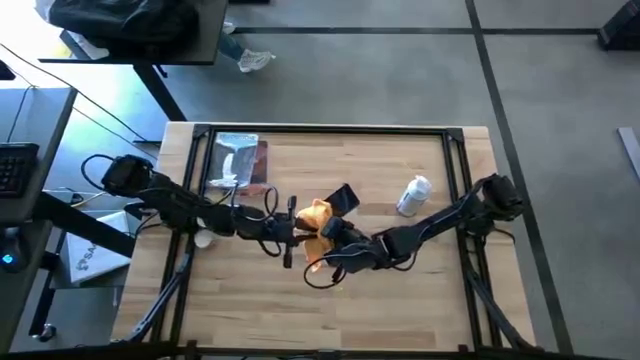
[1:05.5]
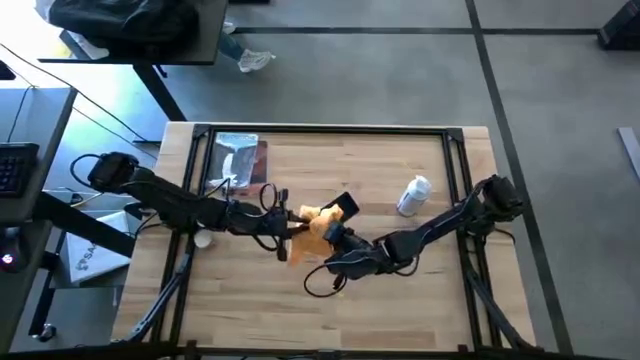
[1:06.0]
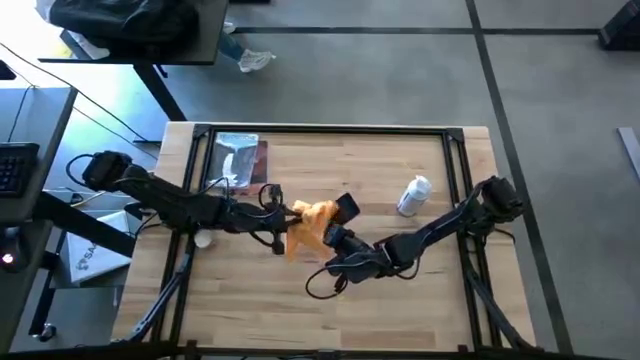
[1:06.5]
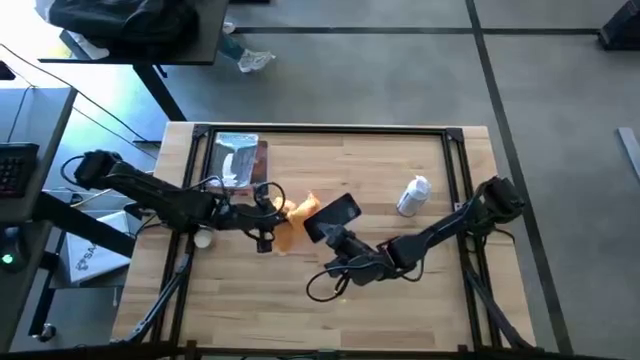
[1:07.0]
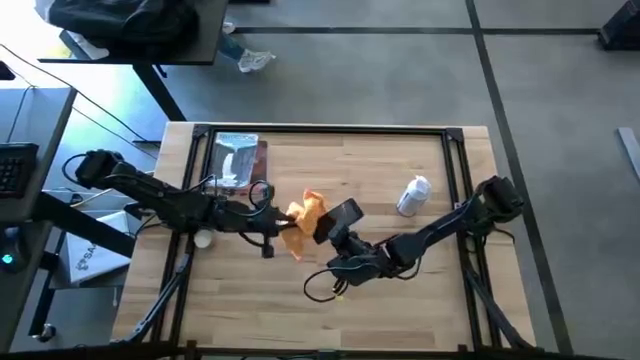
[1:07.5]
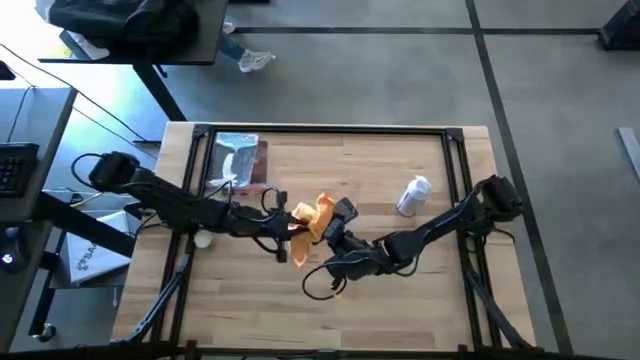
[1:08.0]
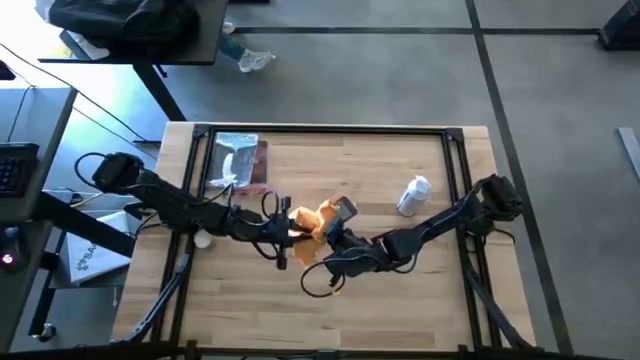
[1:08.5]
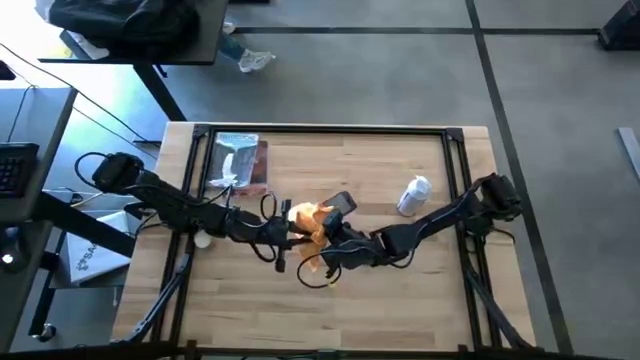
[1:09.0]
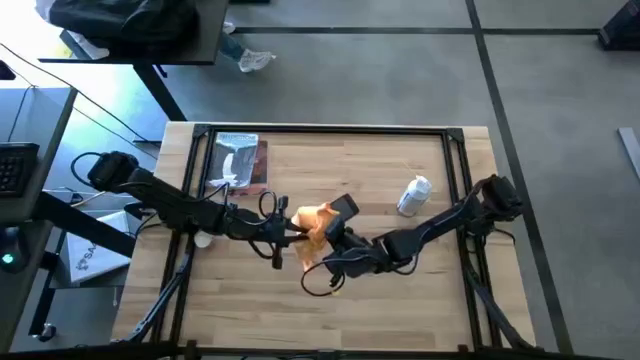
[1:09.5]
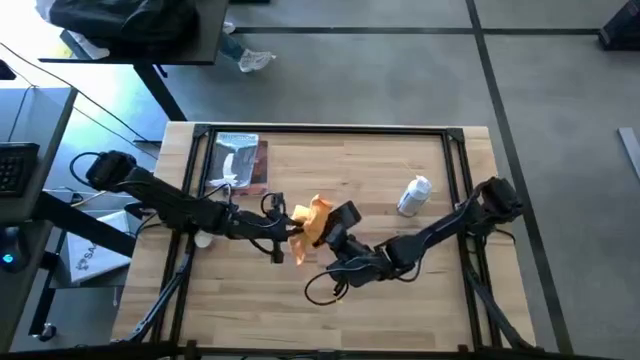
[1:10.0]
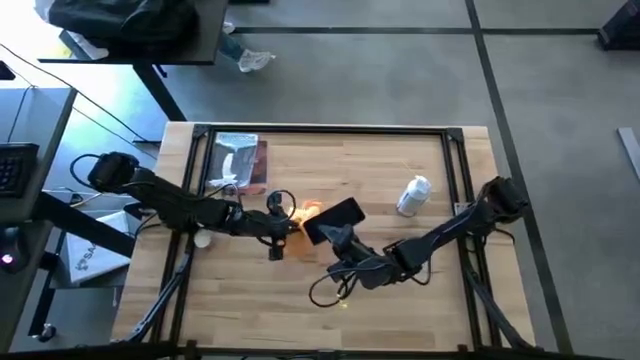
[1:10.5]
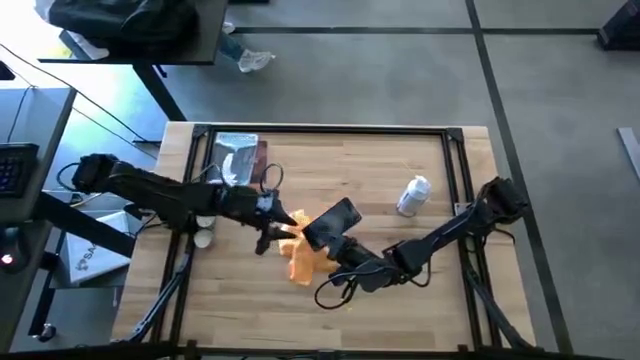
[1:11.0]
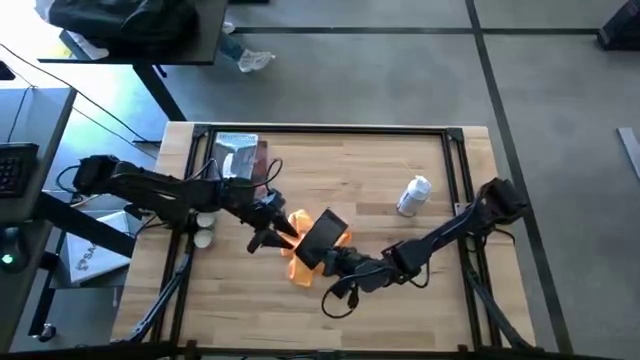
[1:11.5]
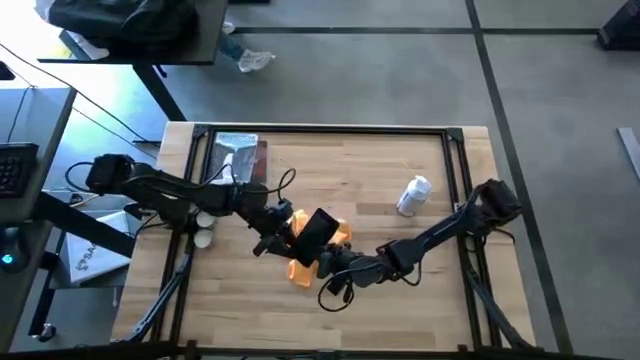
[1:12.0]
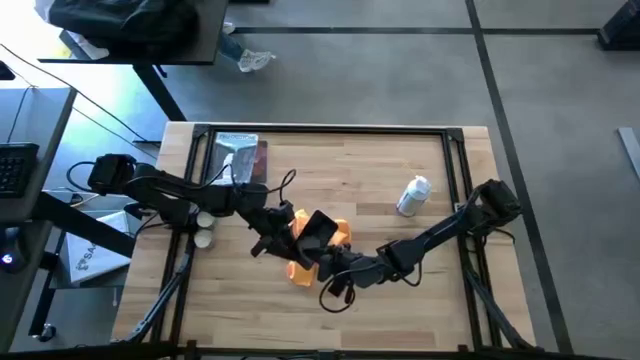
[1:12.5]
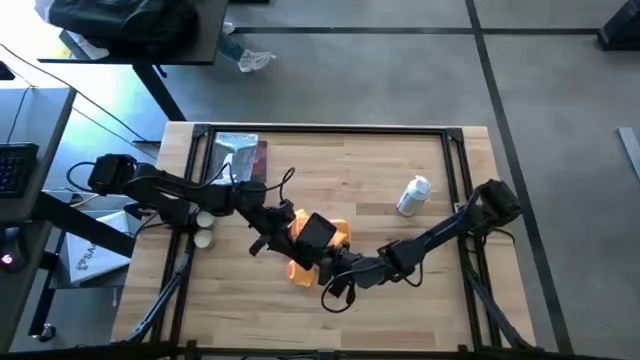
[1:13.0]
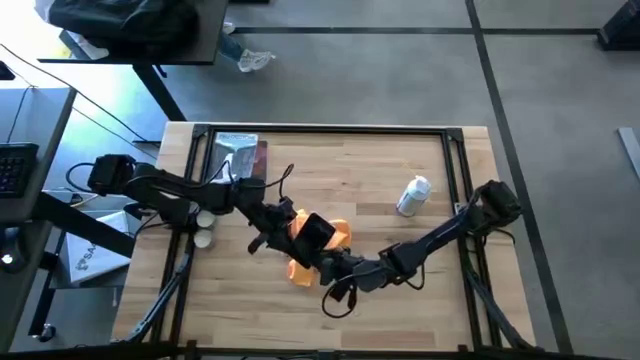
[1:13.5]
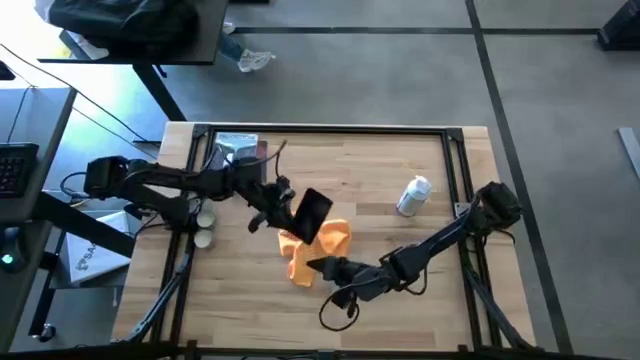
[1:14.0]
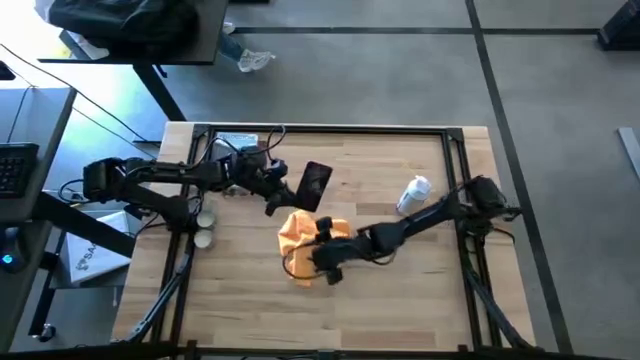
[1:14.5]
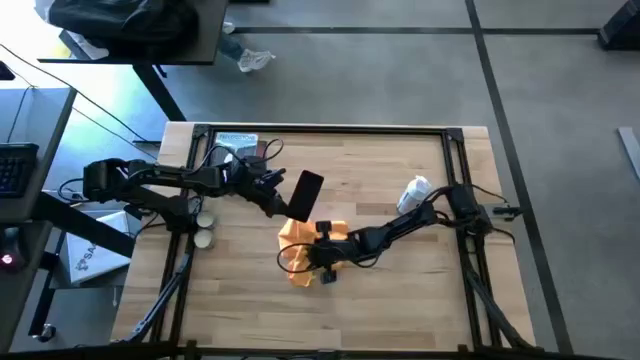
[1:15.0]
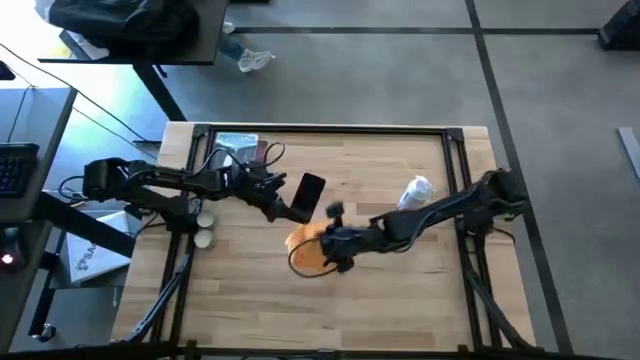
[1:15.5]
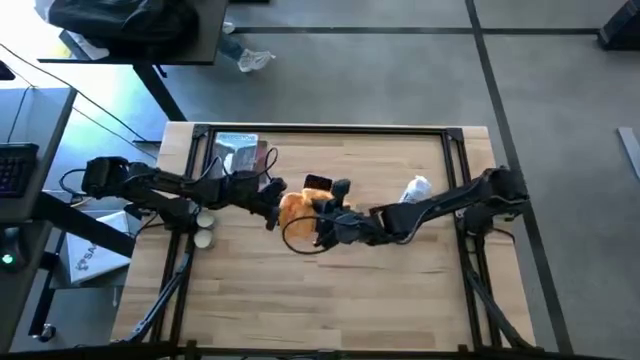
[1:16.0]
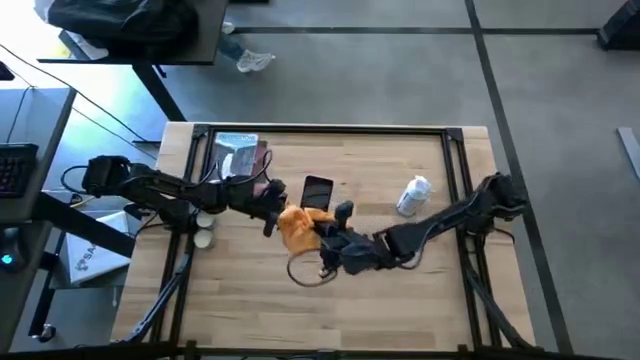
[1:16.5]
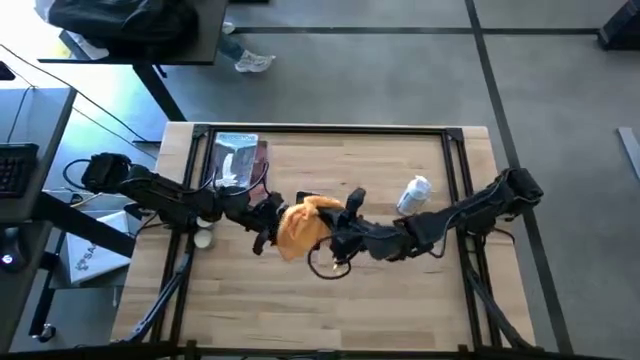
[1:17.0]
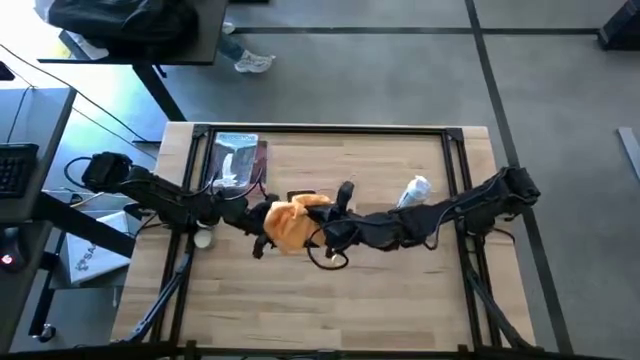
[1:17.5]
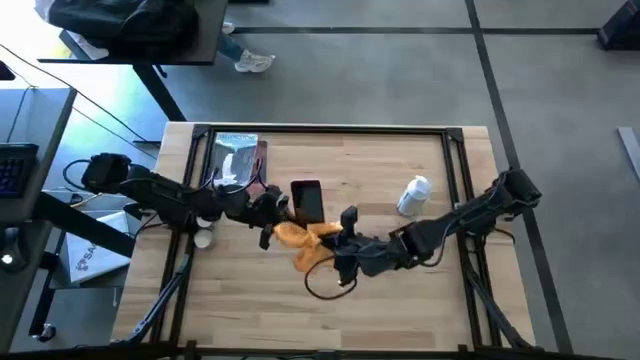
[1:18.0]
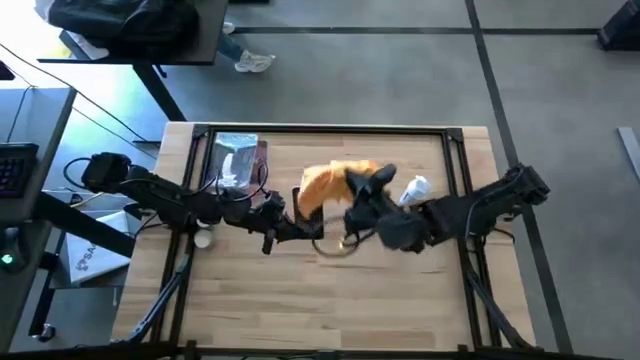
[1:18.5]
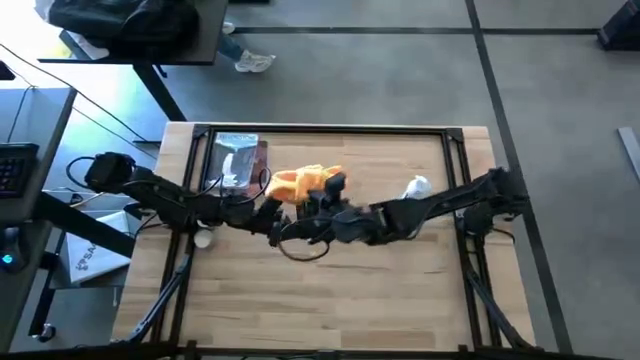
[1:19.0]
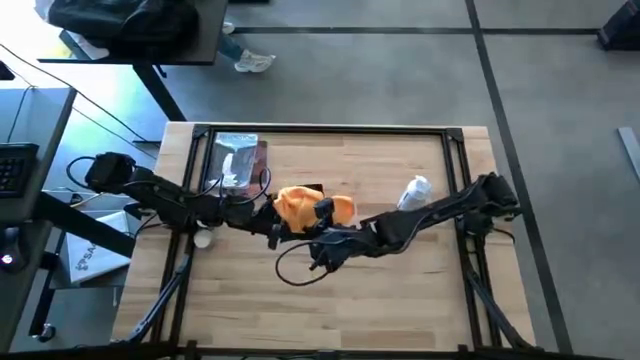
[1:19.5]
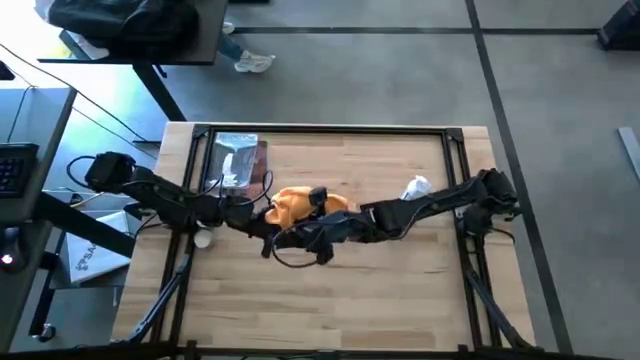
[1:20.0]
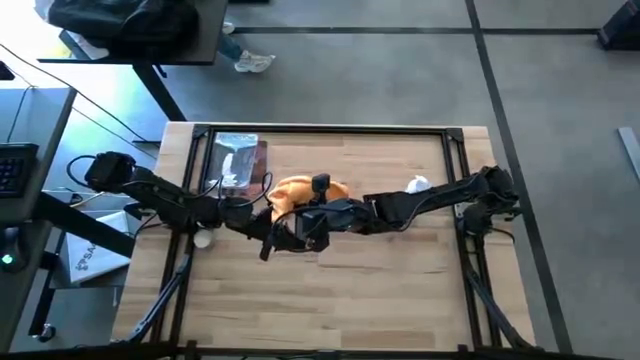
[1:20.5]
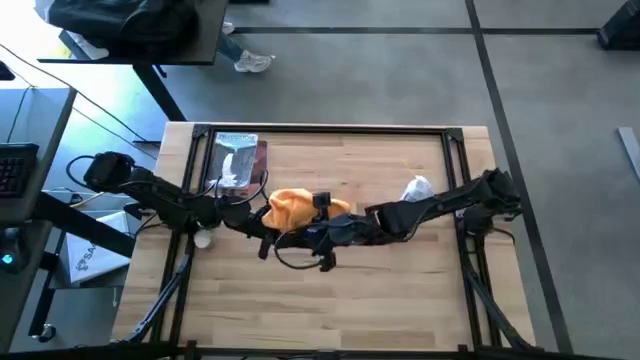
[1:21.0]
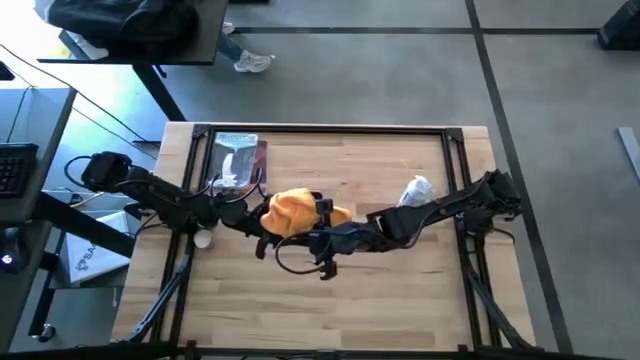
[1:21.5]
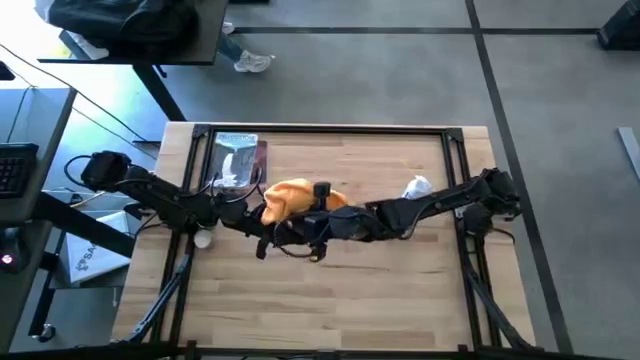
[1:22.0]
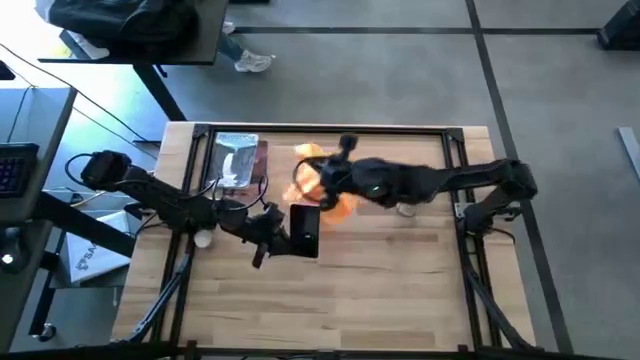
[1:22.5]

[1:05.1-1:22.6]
Task: Apply microfiber cloth
Wipe the front and back of the cellphone with the yellow microfiber cloth
